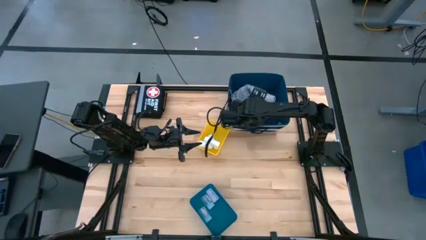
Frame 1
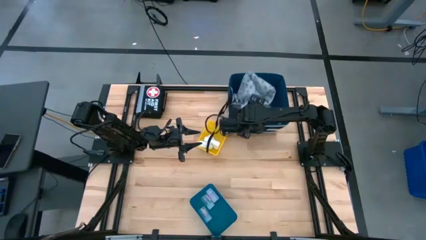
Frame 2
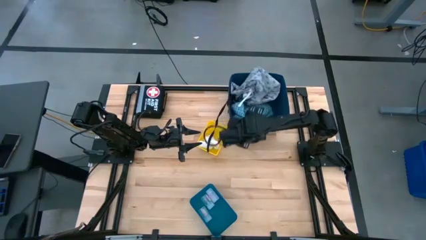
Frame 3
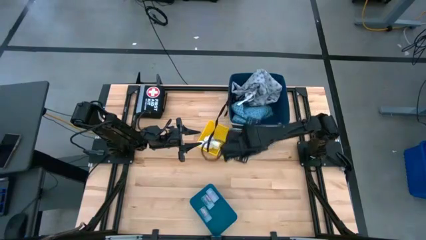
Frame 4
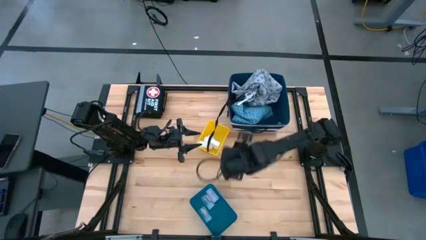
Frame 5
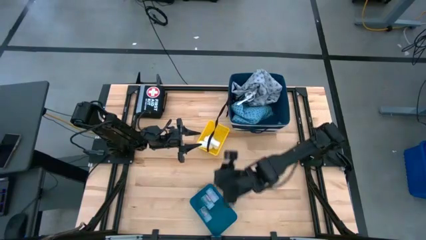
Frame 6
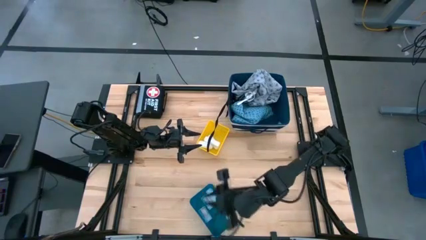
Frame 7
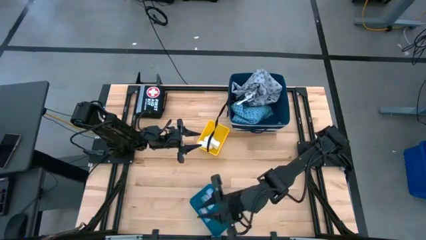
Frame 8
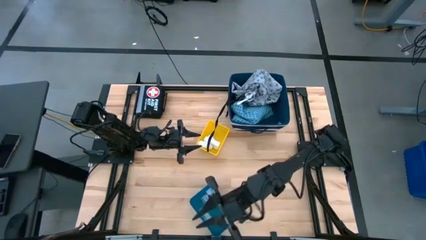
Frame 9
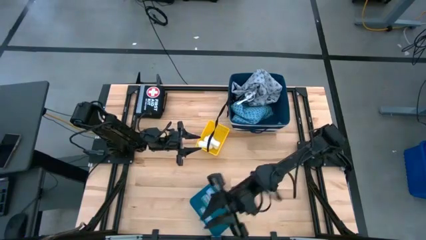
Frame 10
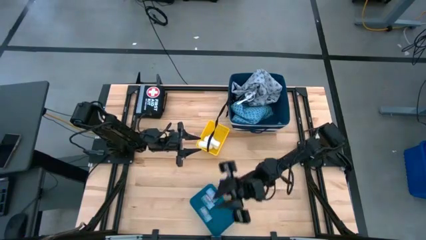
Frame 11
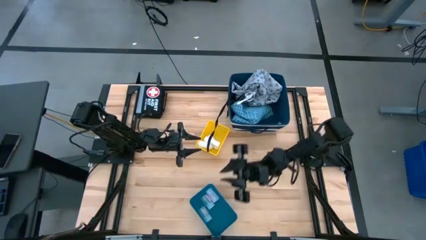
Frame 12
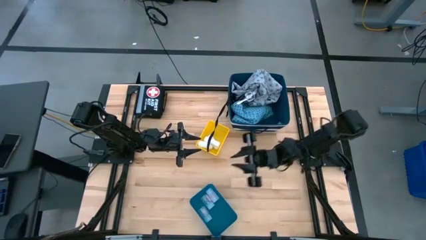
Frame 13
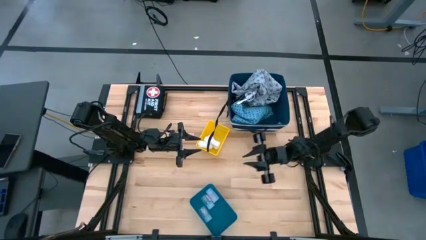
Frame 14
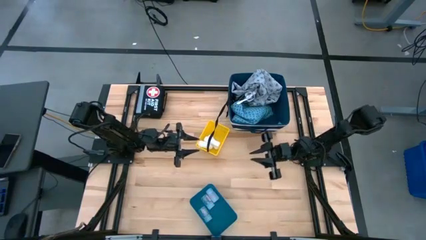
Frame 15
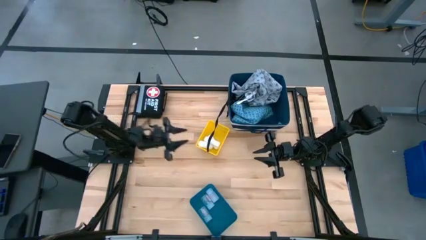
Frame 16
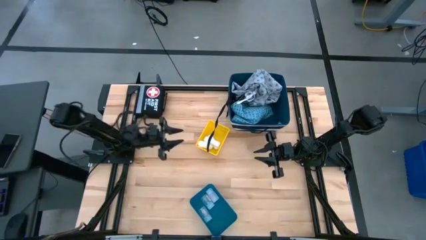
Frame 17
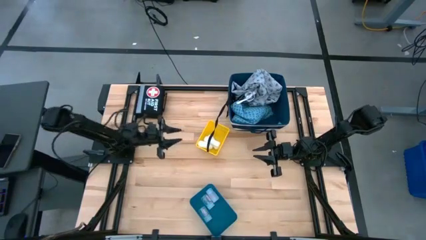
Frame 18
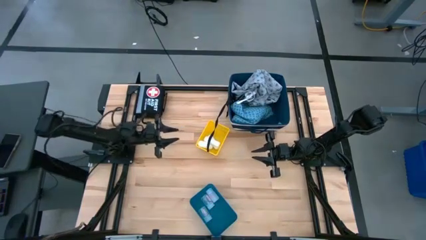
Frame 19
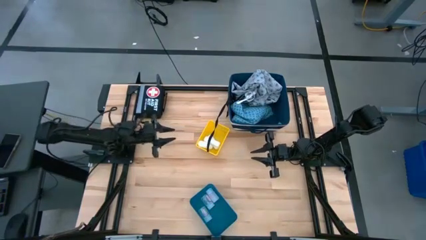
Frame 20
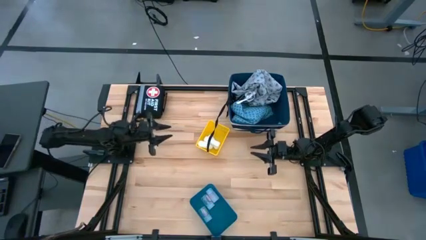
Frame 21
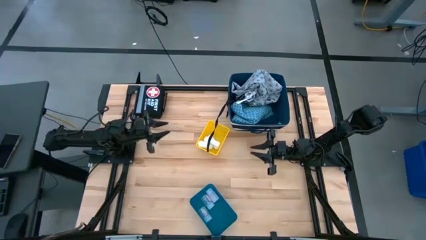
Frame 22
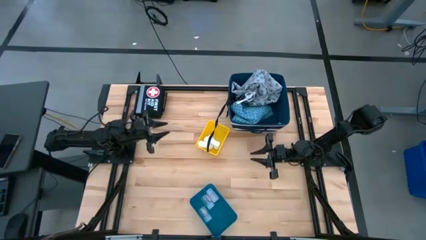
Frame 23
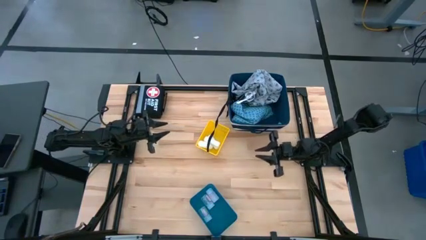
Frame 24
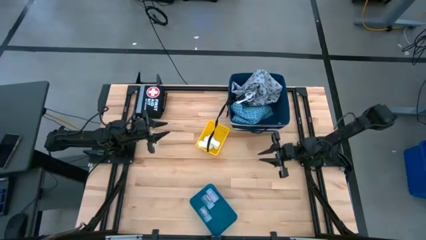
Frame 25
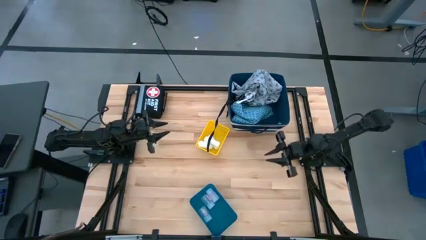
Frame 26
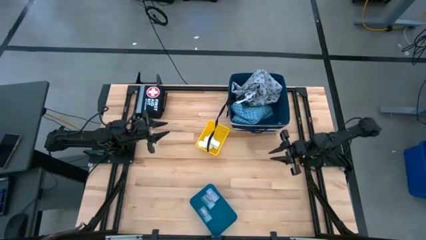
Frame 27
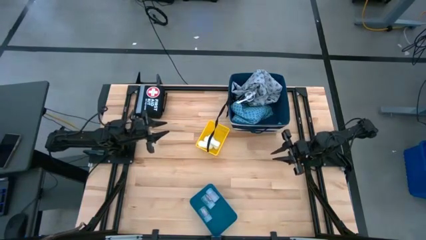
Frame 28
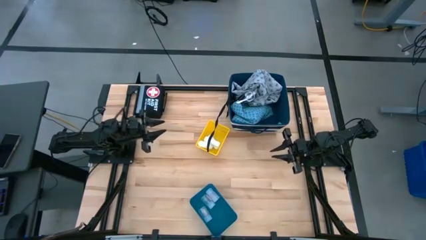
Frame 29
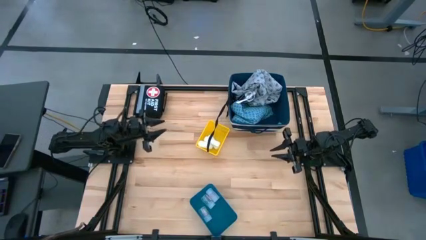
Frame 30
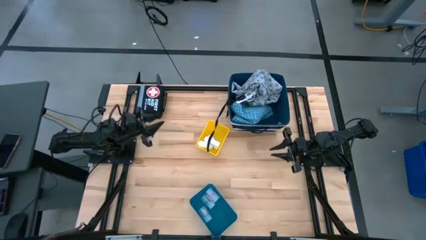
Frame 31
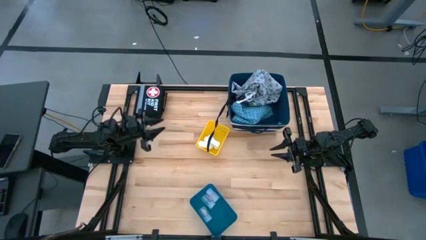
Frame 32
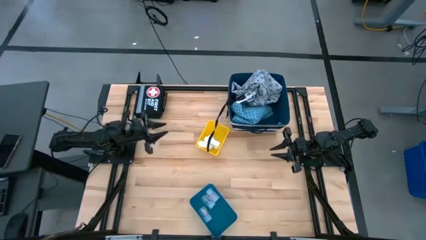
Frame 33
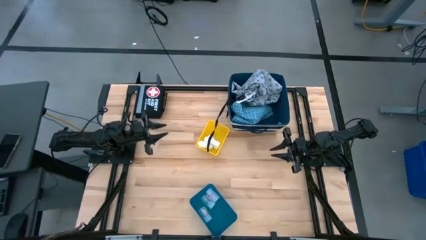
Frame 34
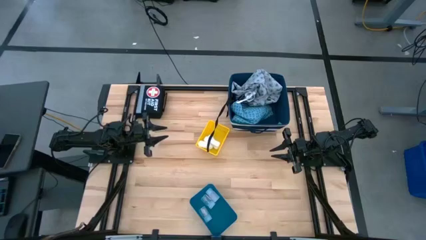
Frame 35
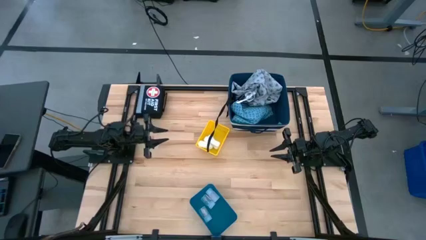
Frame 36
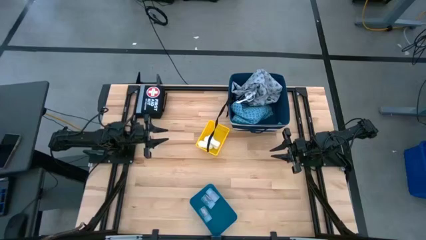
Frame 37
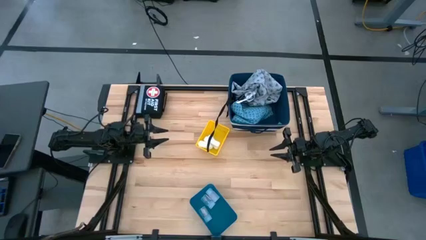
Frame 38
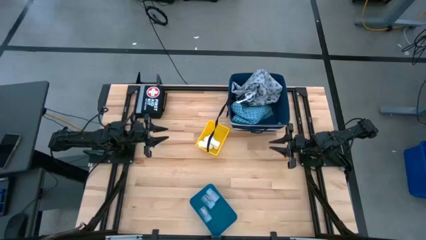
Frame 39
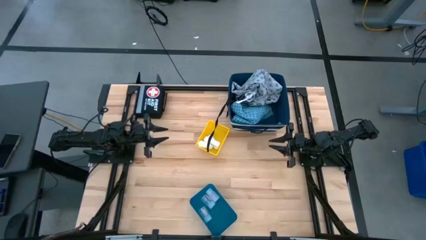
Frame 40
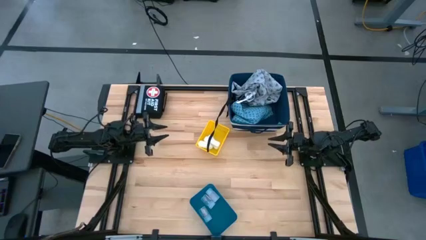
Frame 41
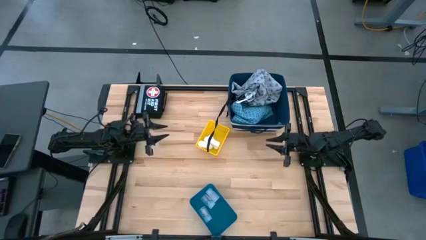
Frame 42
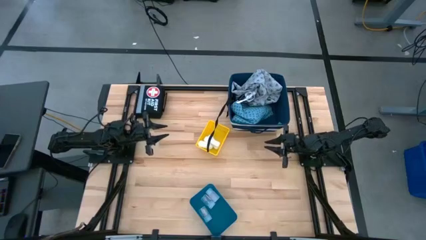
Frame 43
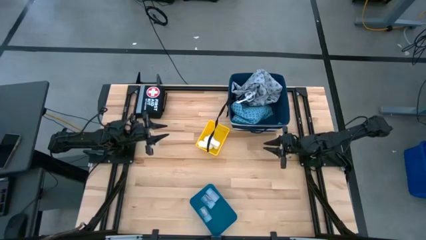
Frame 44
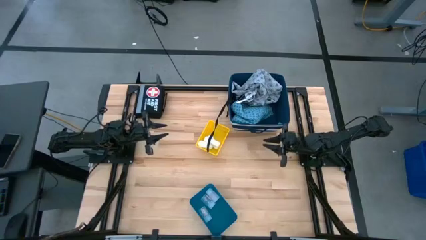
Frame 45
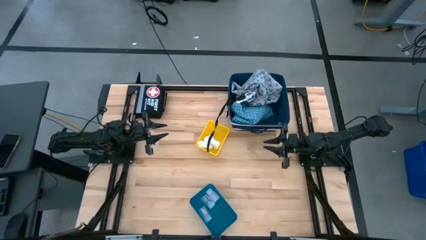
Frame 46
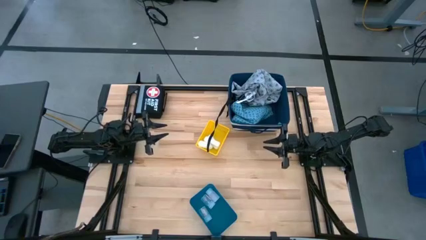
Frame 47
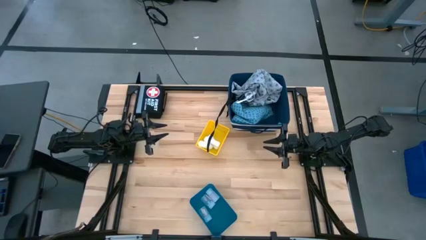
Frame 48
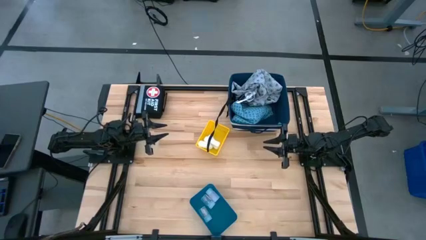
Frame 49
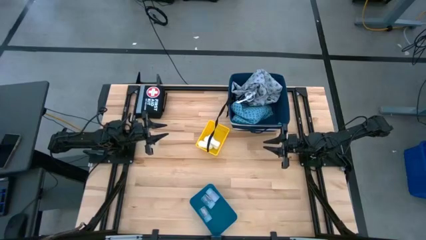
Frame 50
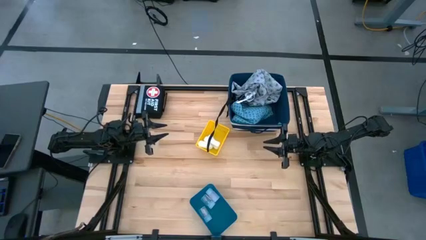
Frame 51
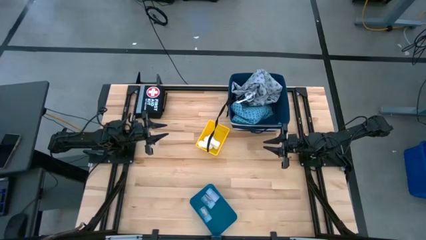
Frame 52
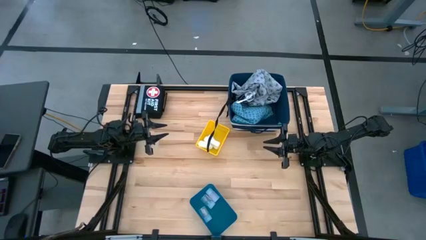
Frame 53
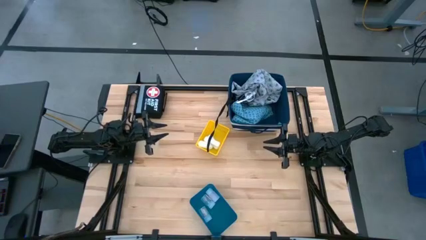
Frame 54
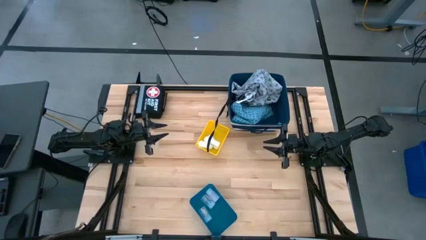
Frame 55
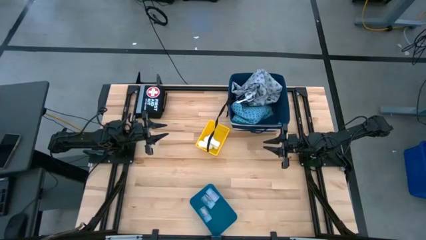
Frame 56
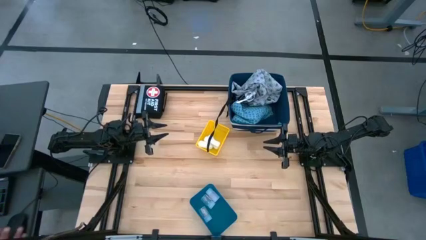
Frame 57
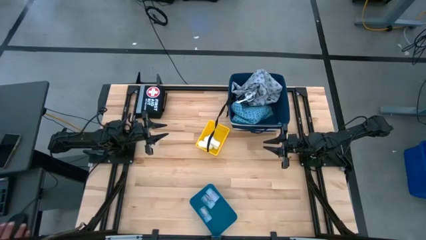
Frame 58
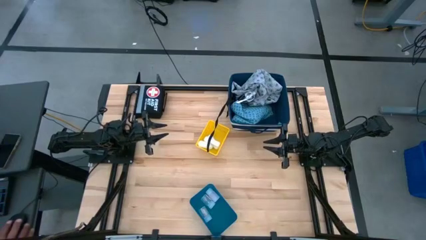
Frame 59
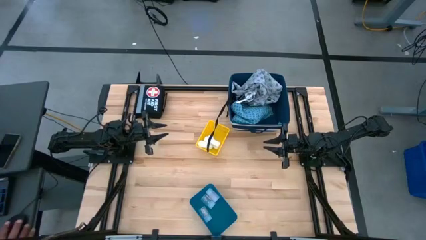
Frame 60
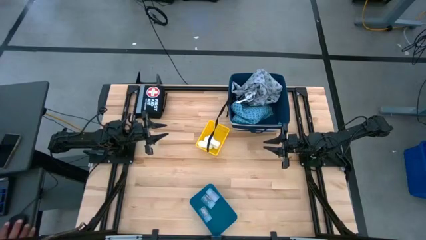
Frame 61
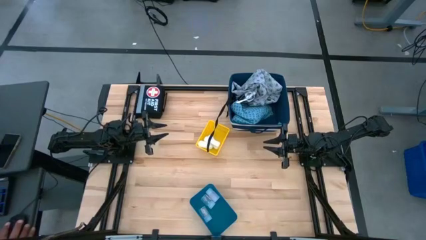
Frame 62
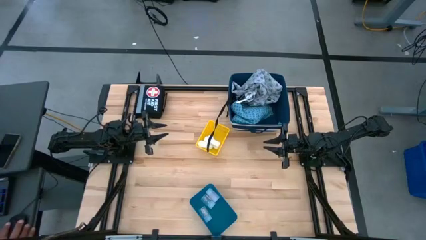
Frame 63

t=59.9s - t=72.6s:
Task: Pick & place medical supplies in basket/bin
Return to Home Position

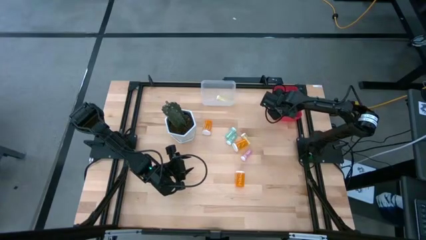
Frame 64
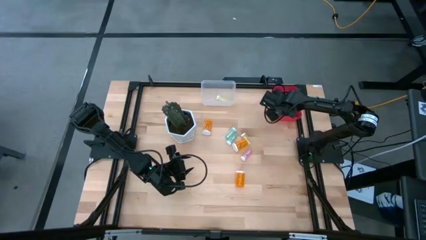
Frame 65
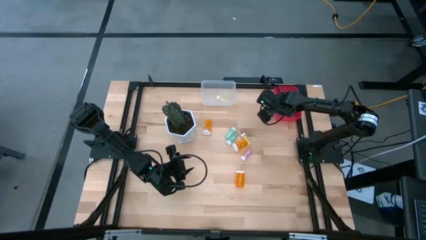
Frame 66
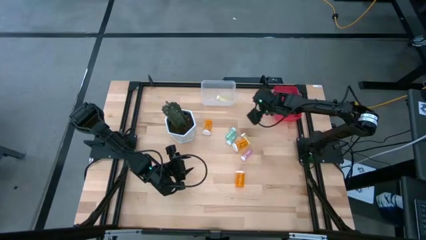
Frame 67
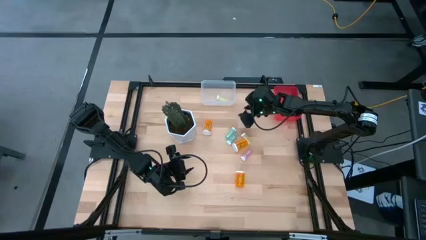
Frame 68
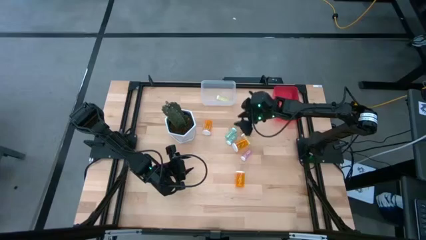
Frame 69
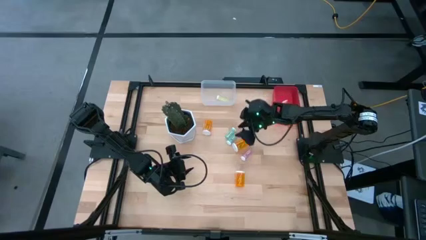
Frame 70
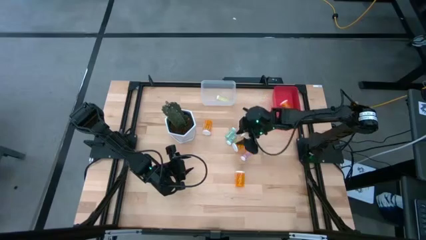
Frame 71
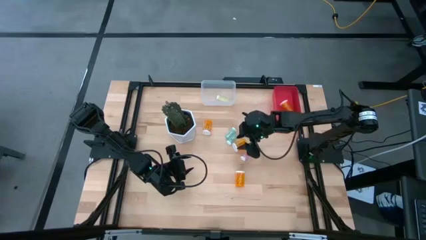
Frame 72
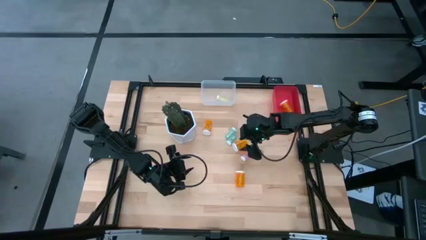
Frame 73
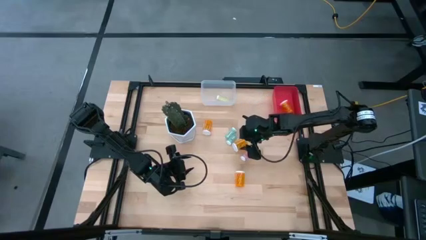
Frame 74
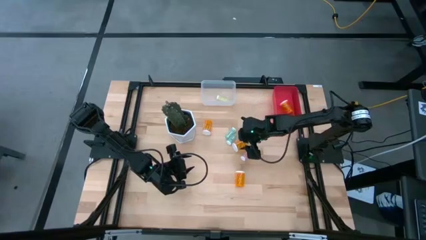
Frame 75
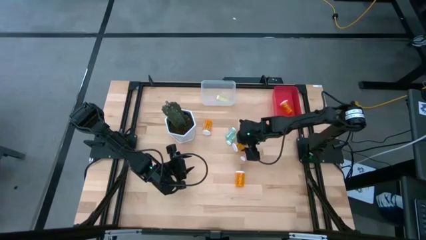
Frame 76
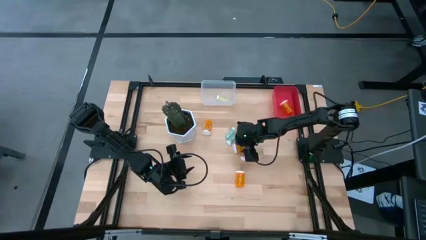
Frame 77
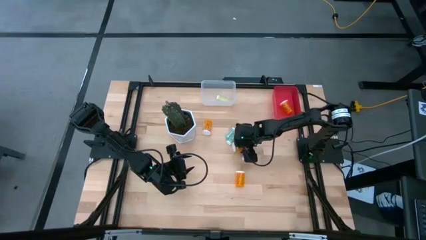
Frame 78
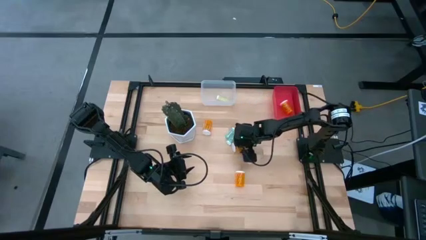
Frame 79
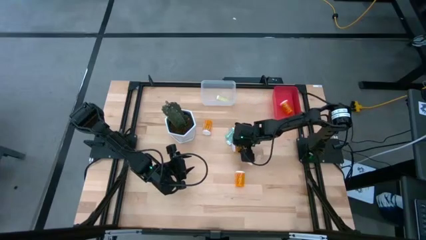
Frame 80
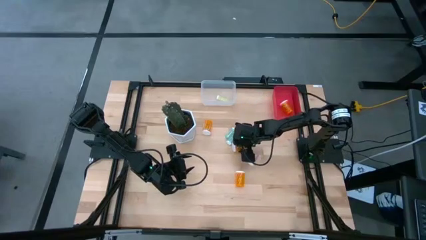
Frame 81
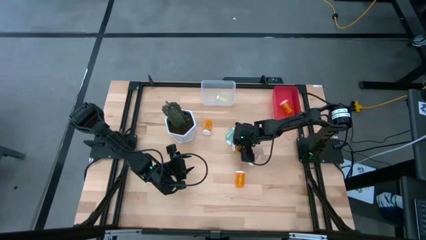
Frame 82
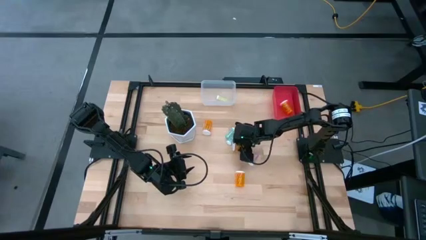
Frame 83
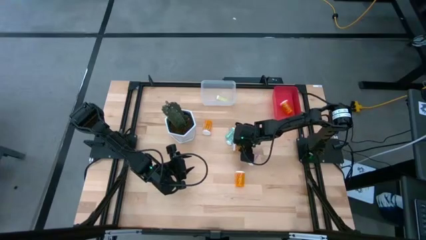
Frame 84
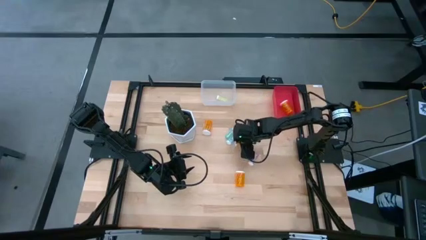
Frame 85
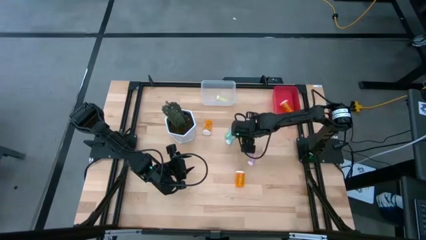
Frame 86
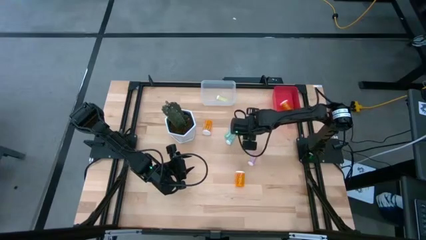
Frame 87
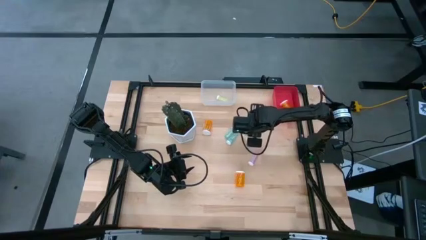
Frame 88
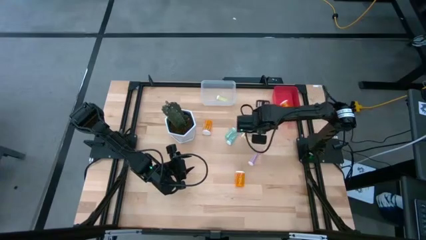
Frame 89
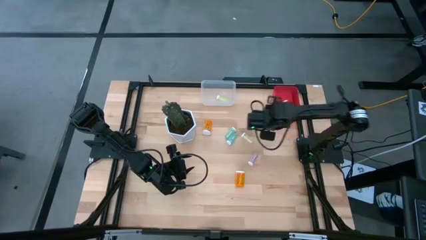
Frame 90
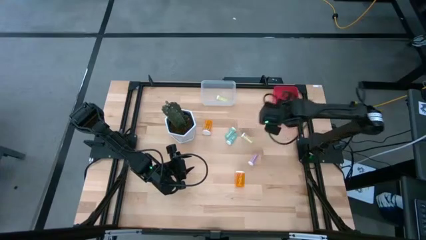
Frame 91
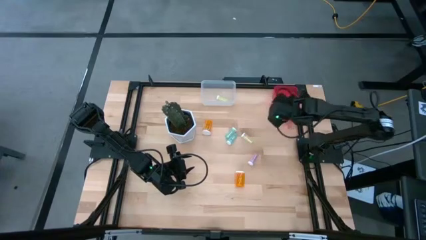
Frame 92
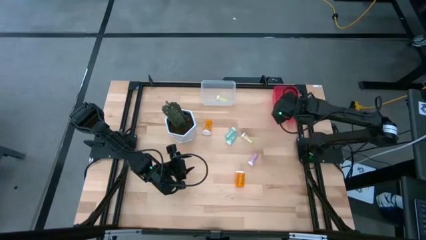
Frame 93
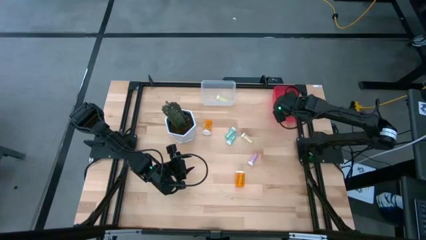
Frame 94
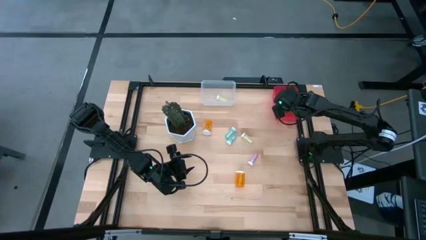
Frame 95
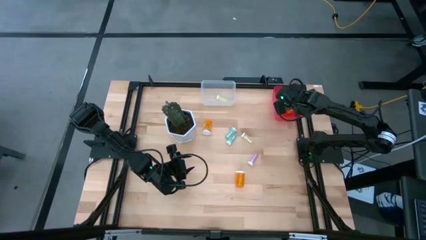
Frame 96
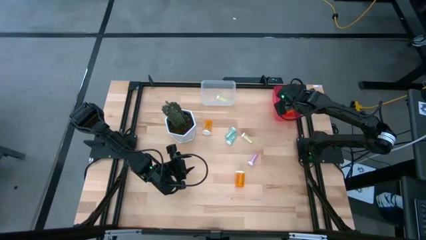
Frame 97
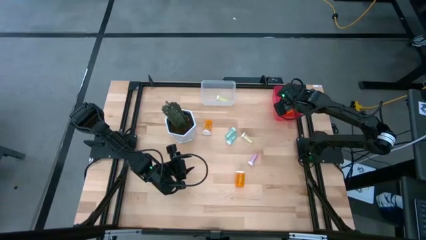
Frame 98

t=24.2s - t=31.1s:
Task: Pick and place medicine bottles into bin by pill shape (circle, oval)
Put the large orange pill bottle into the red bin
